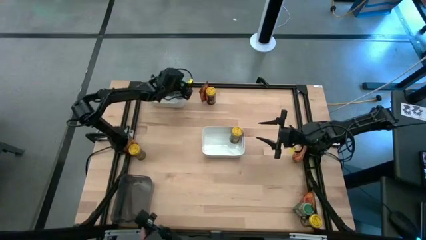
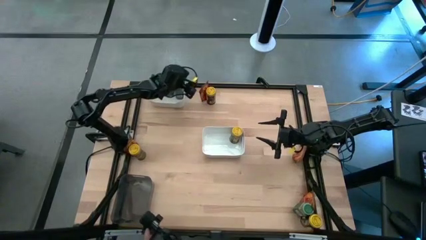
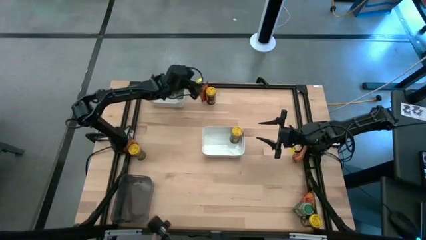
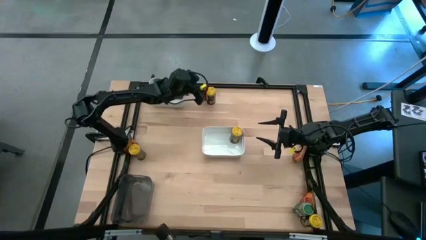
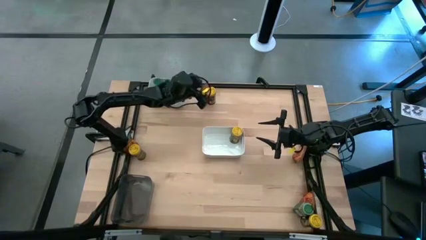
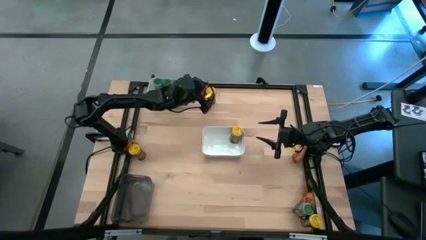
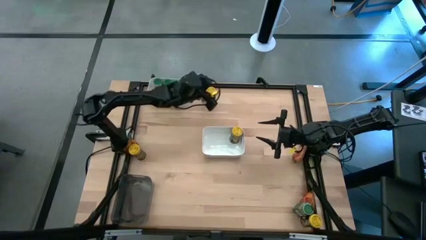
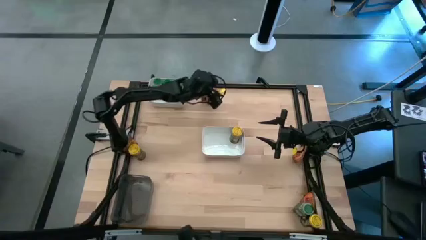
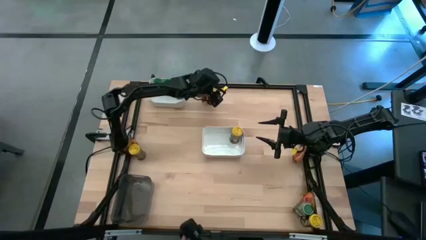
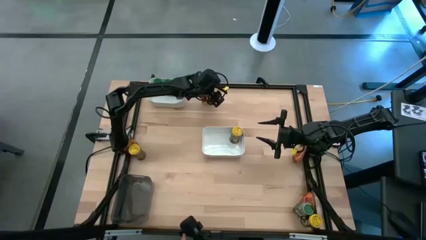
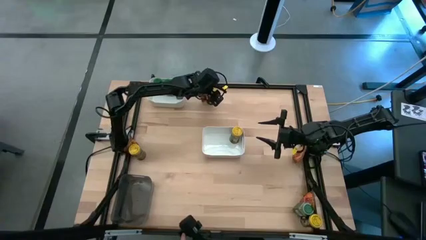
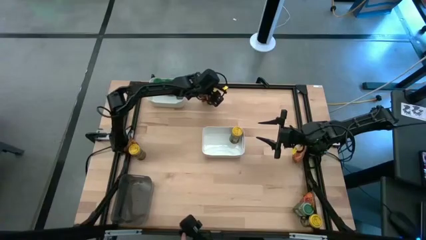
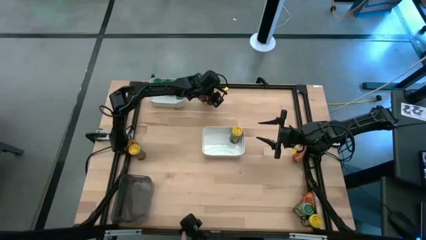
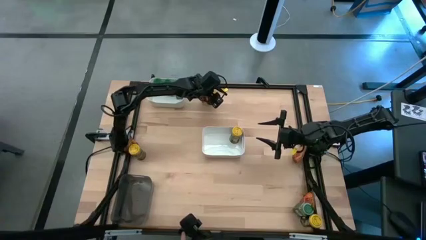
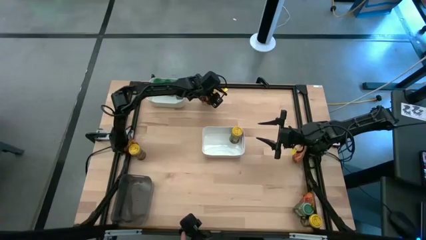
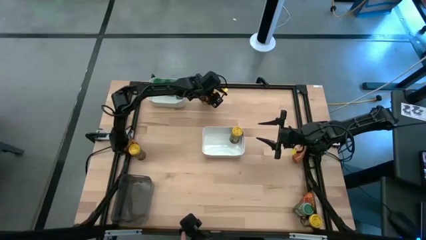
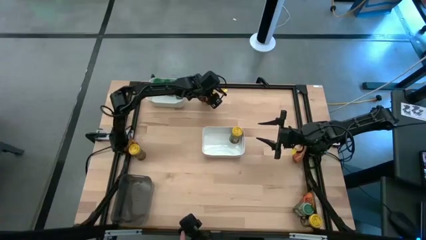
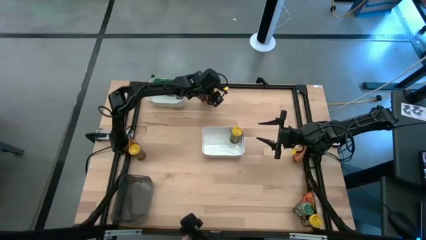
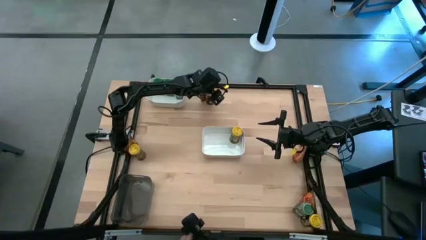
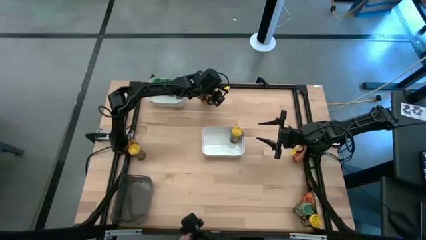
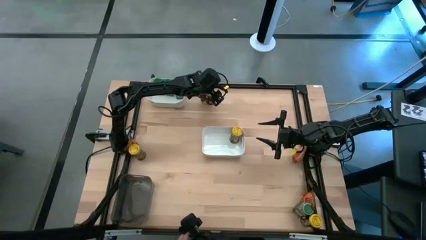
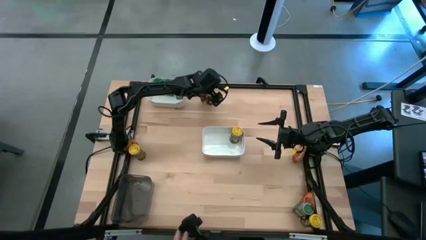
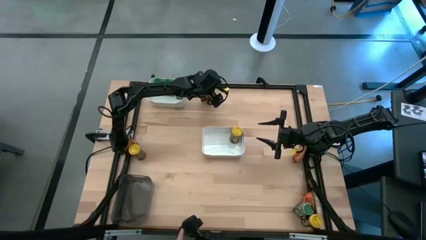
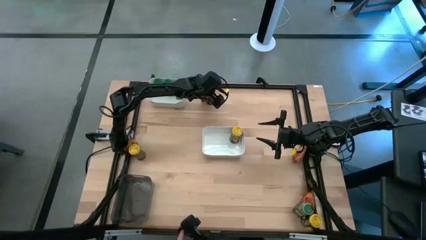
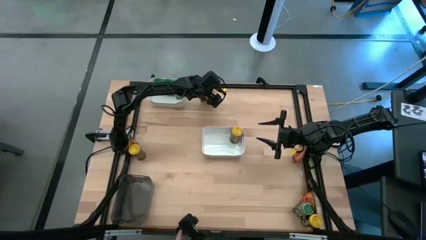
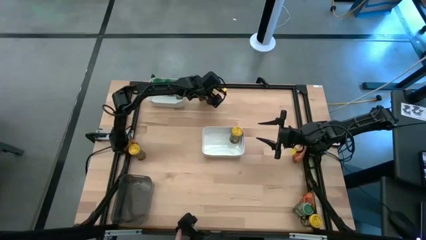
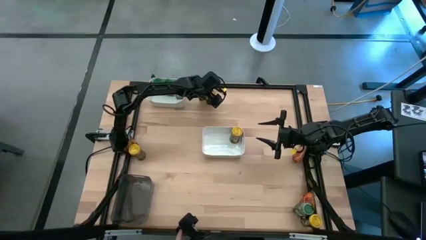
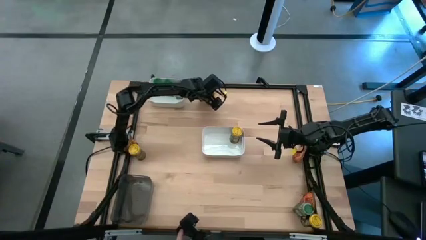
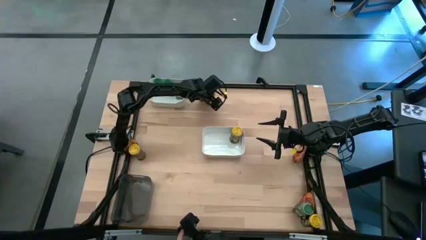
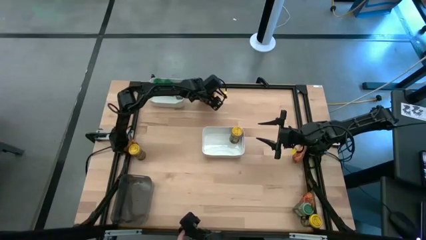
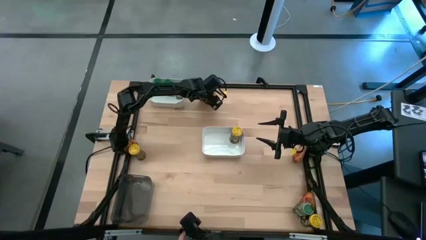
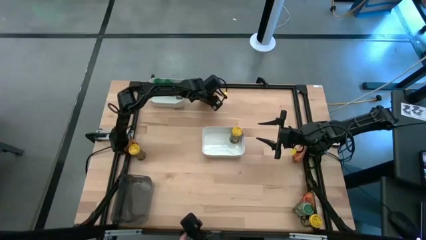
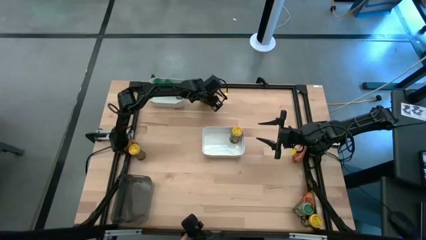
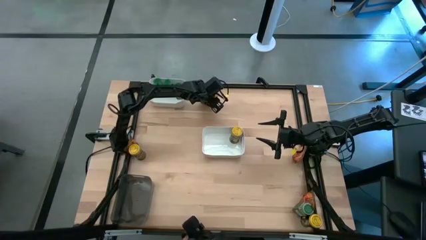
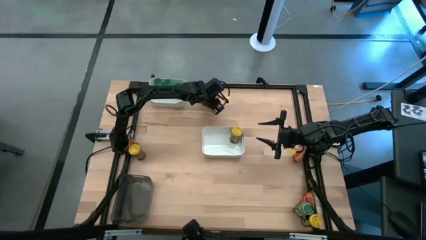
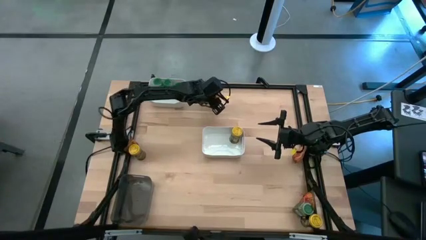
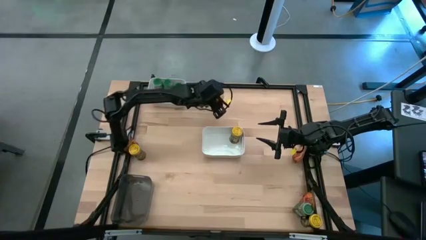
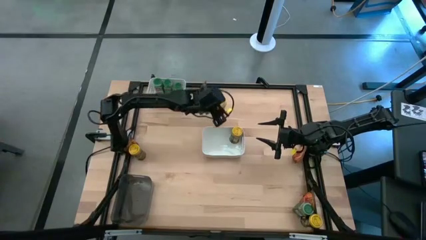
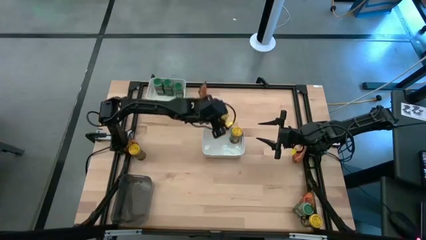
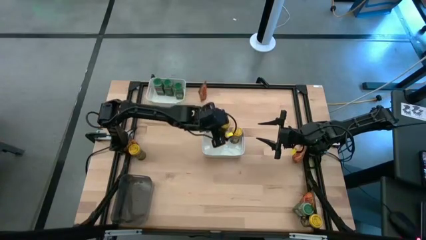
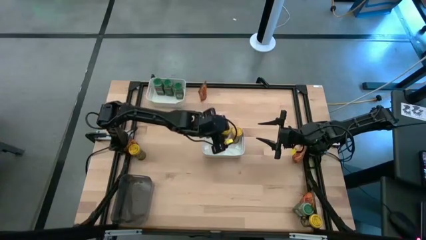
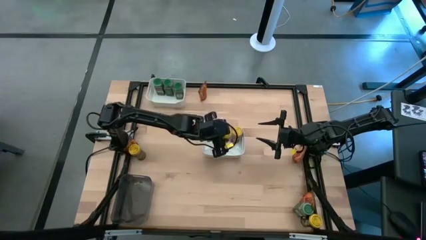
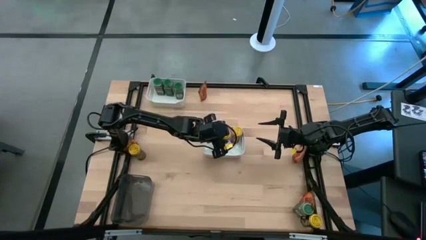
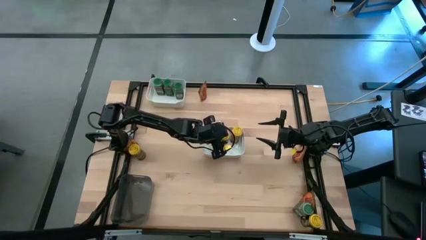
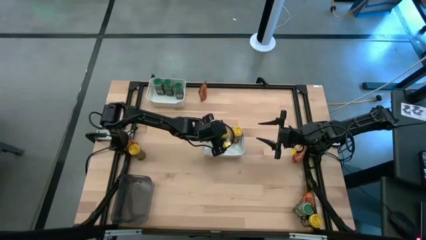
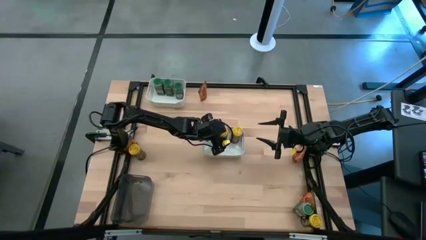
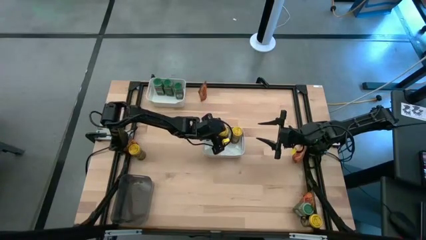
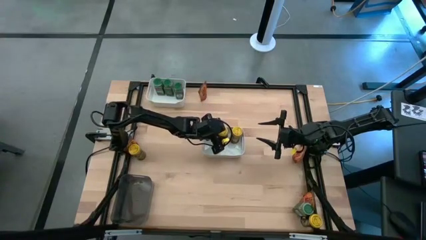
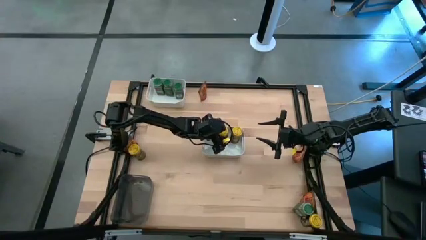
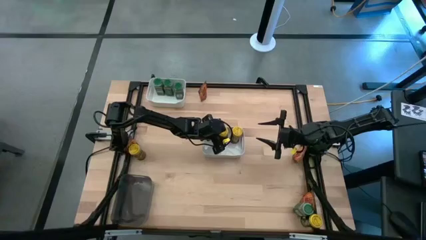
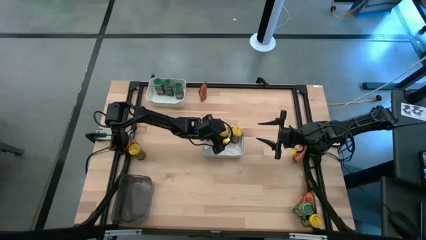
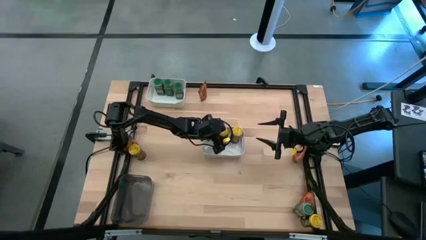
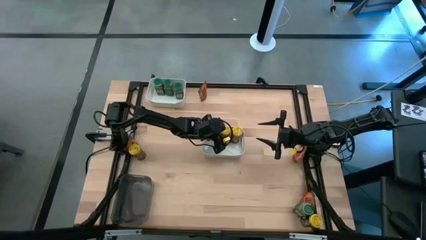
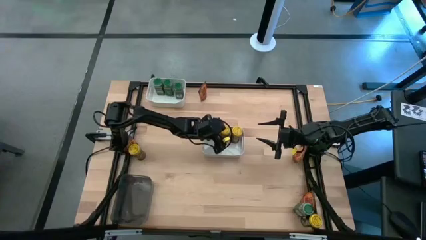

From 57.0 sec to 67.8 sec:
Task: Sort spices by type
Put the yellow seasoning bottle into the bottom white bin

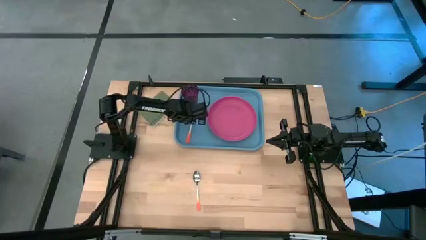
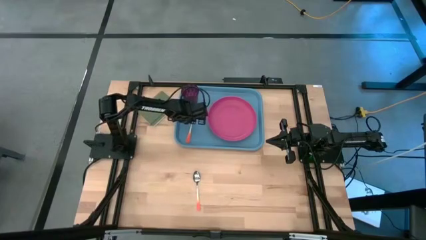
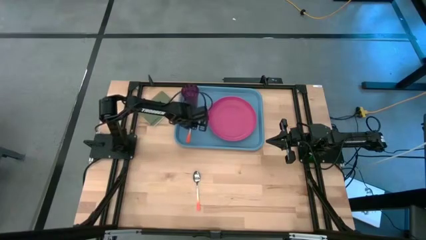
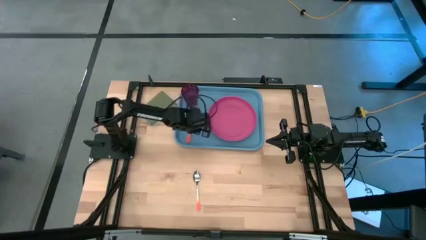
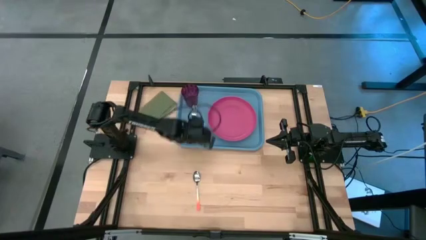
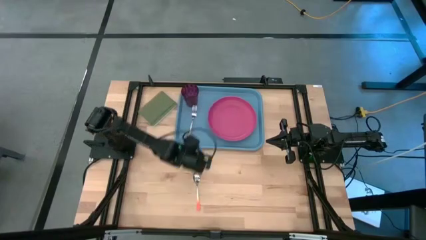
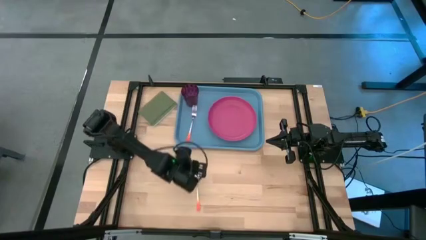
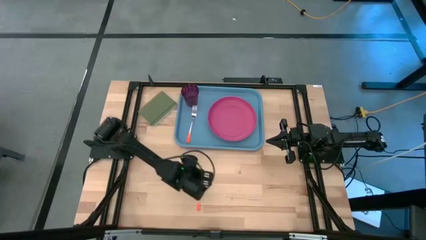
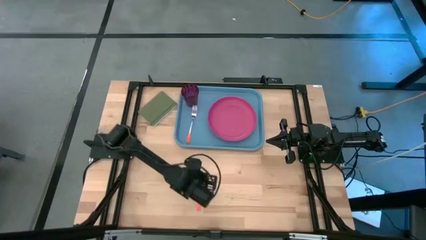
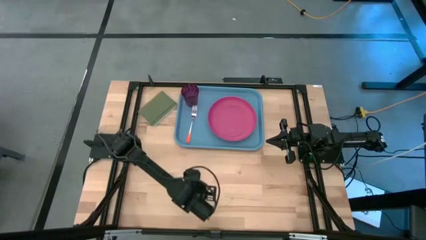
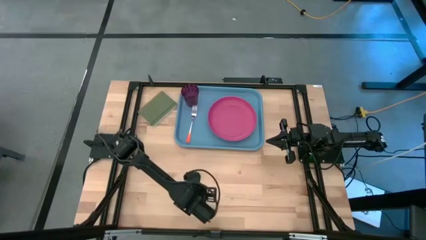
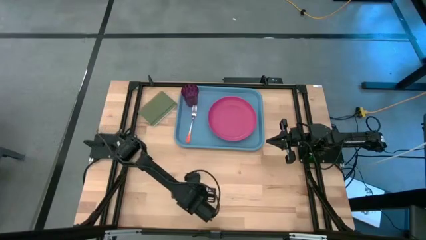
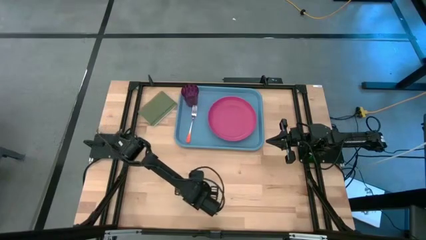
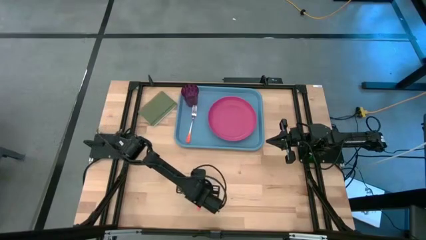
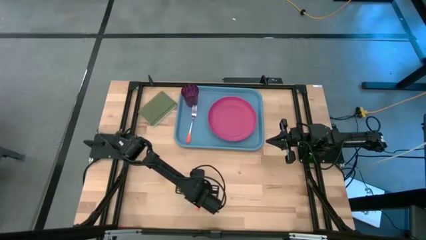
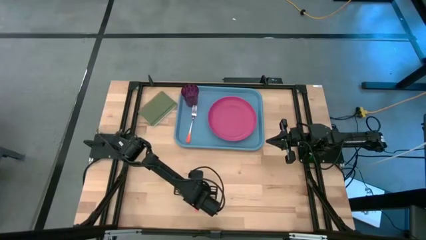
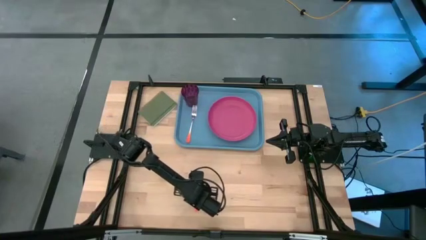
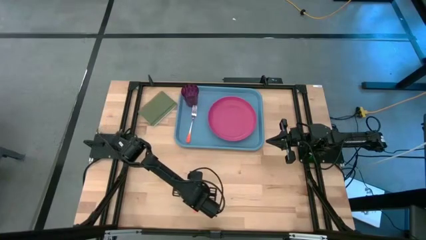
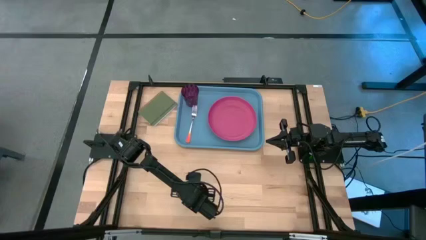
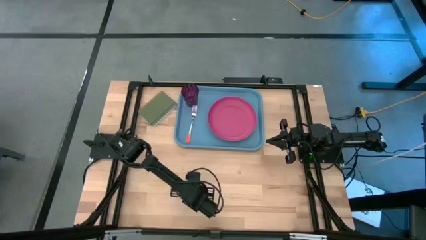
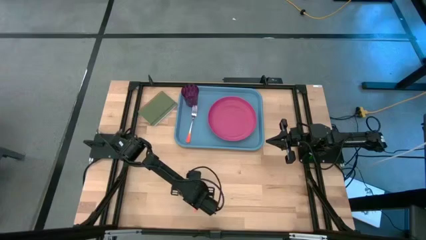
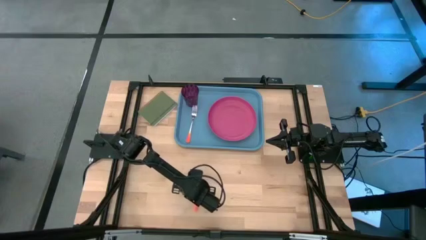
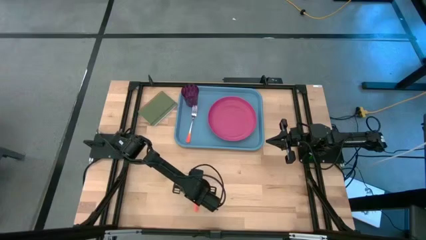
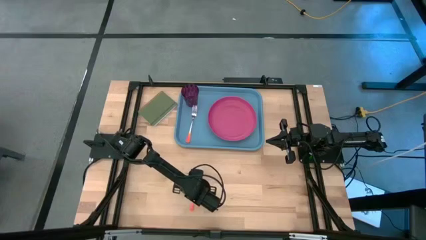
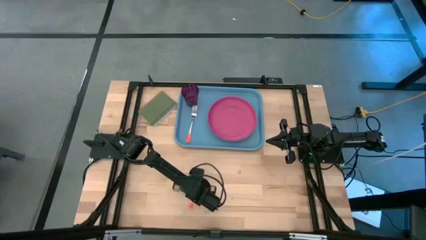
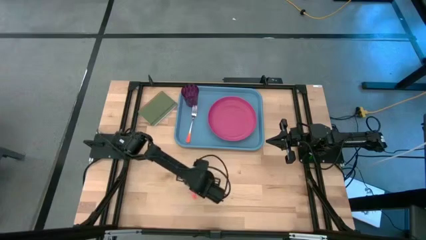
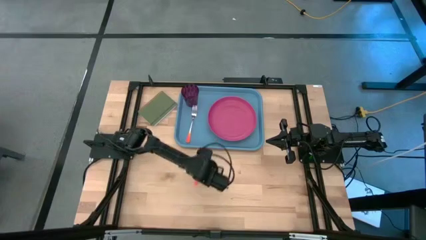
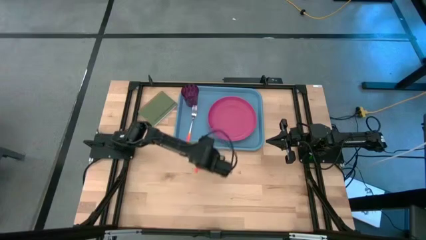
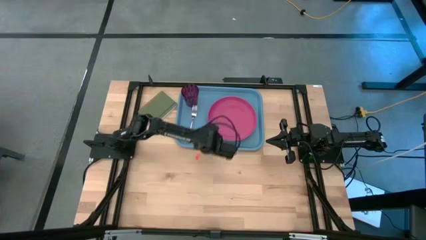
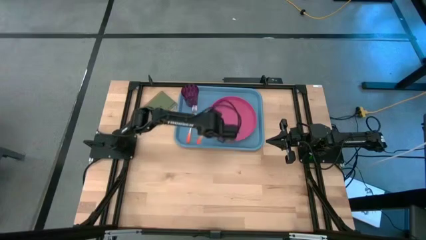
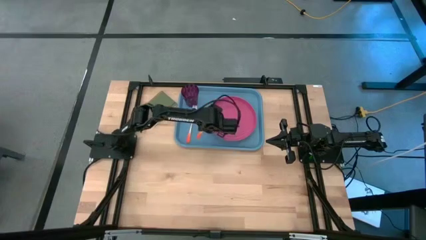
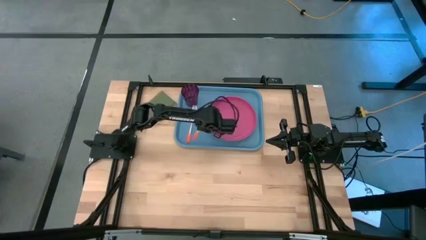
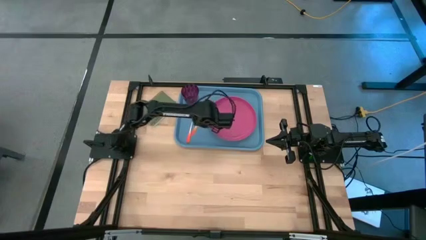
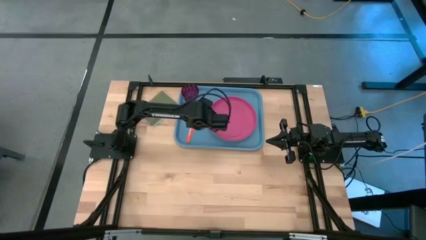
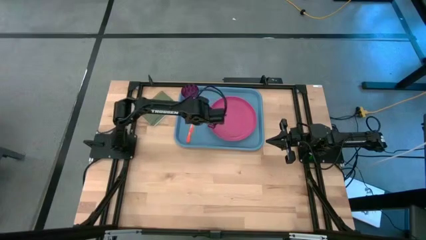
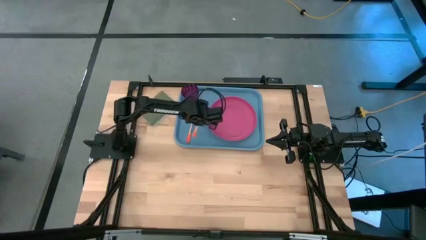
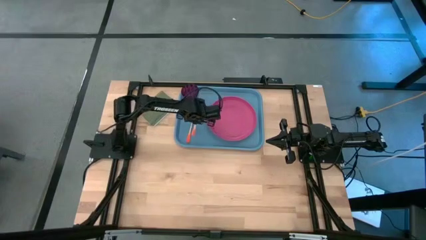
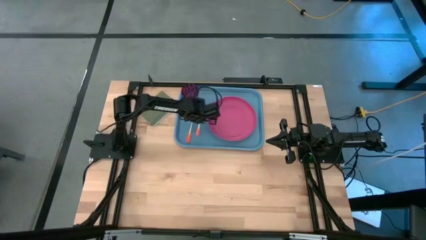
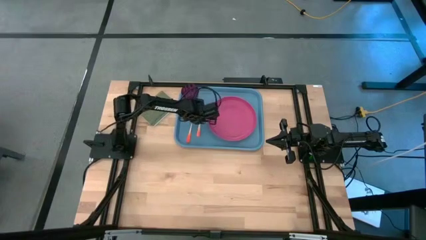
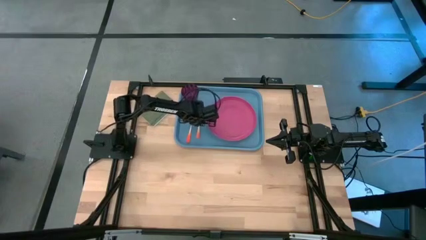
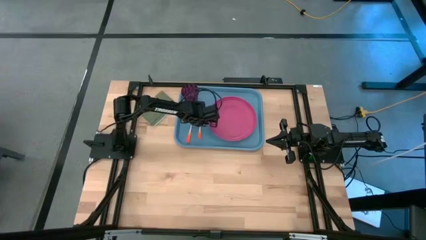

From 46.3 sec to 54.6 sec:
Task: Pick and place plate/cup/fork/spoon on tray
Put the orange spoon in the middle of the orange fork and the pink plate on the blue tray
